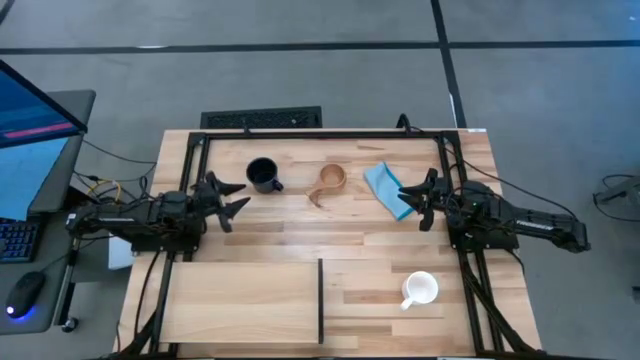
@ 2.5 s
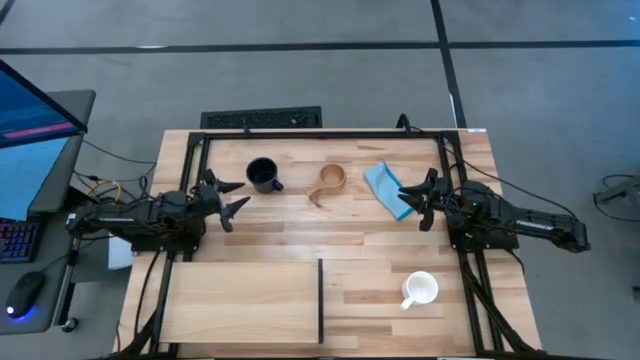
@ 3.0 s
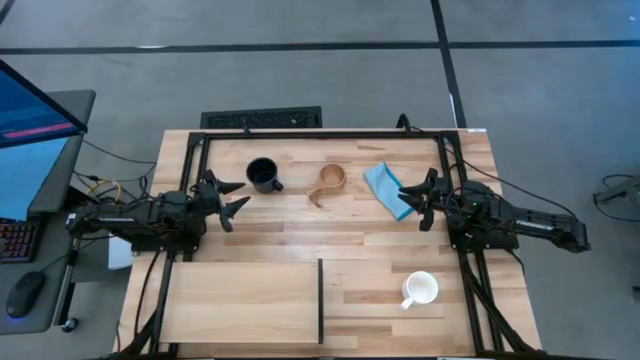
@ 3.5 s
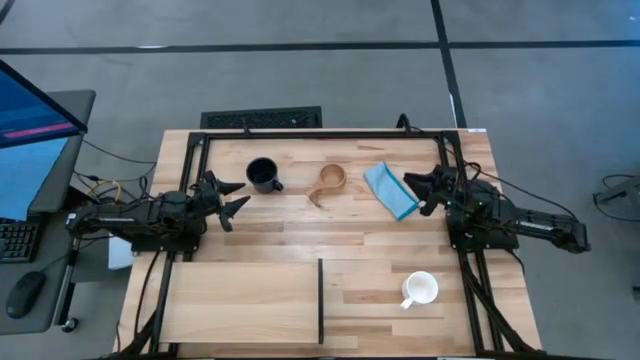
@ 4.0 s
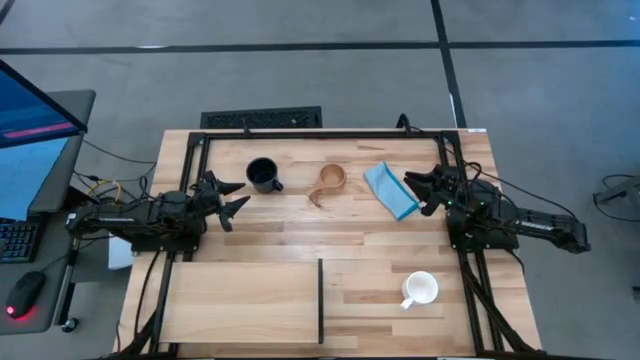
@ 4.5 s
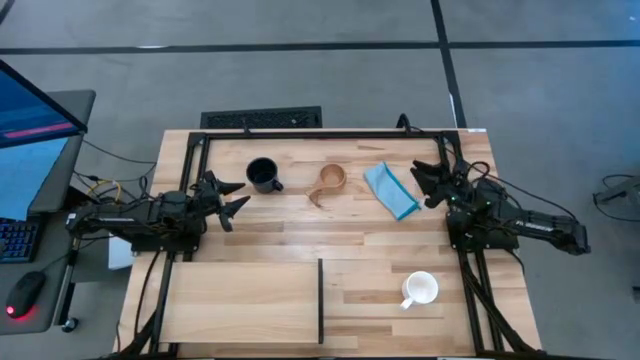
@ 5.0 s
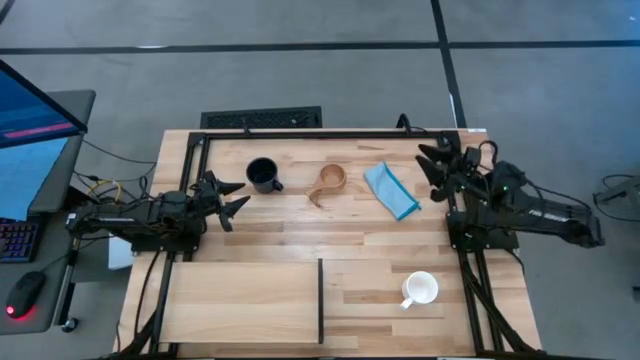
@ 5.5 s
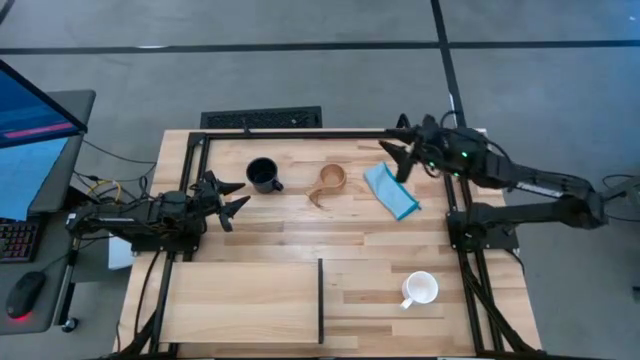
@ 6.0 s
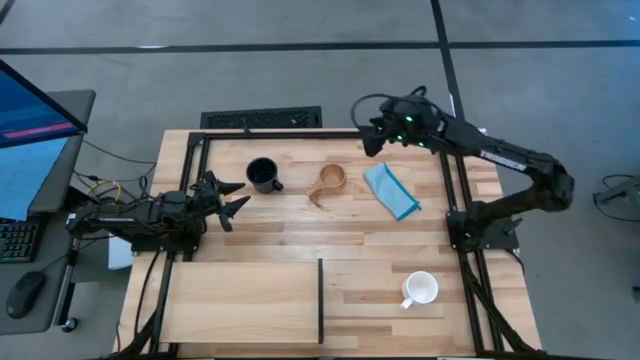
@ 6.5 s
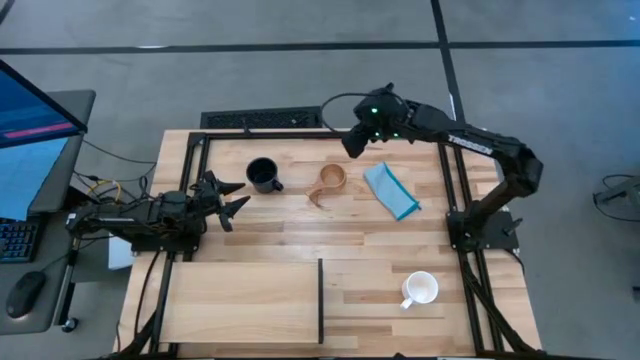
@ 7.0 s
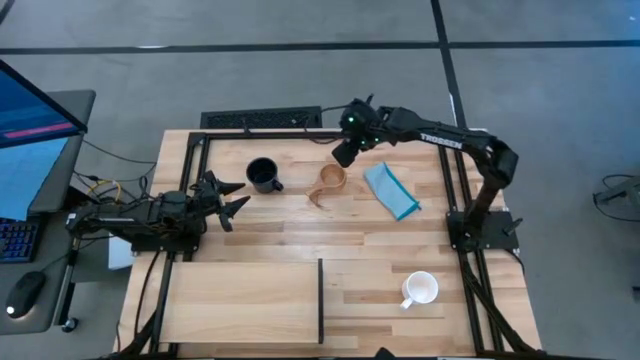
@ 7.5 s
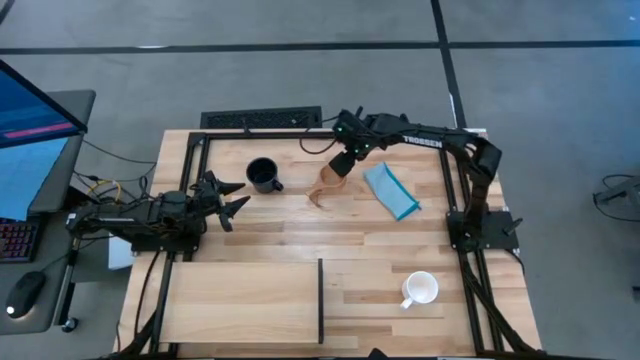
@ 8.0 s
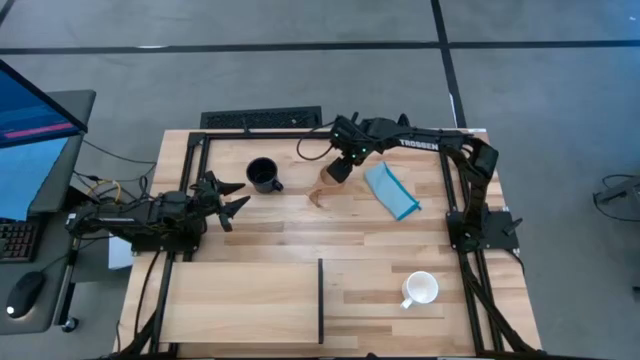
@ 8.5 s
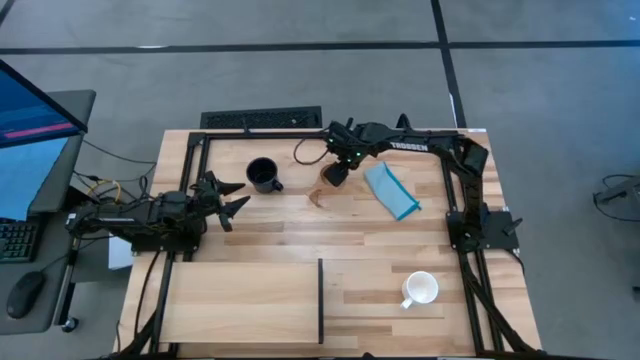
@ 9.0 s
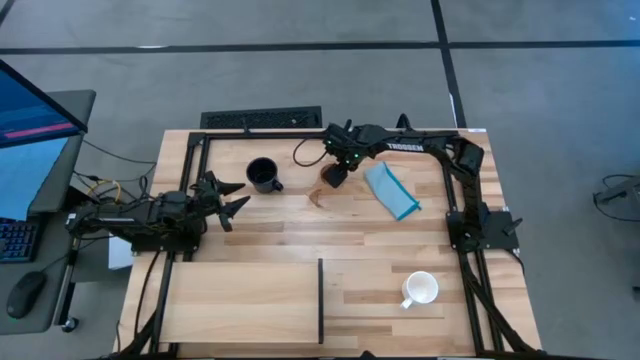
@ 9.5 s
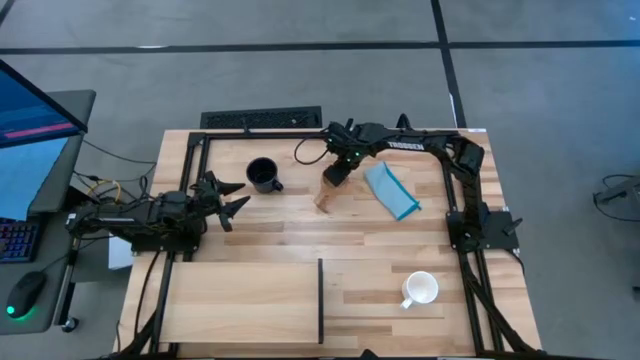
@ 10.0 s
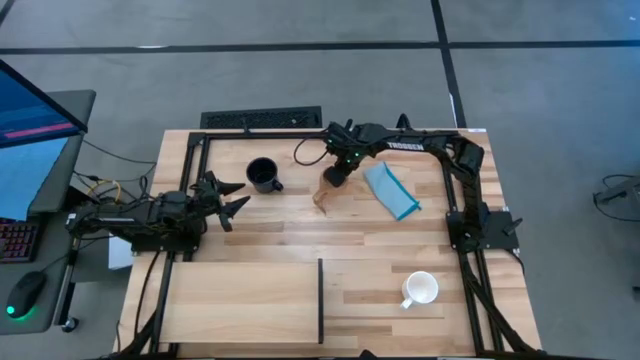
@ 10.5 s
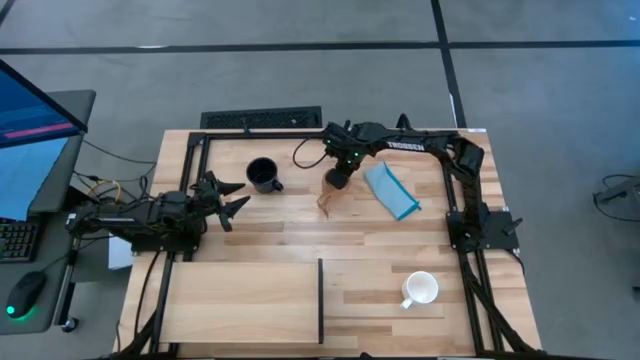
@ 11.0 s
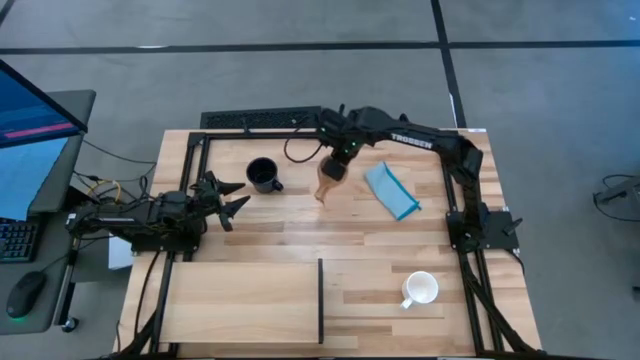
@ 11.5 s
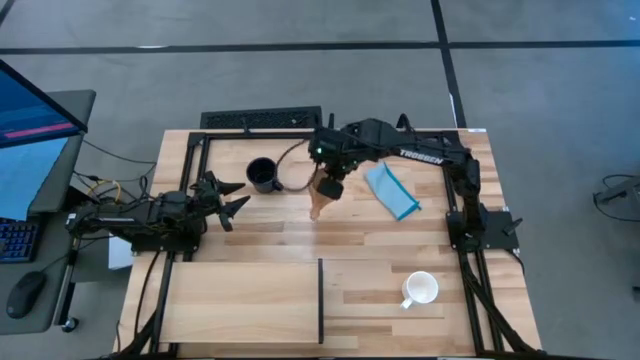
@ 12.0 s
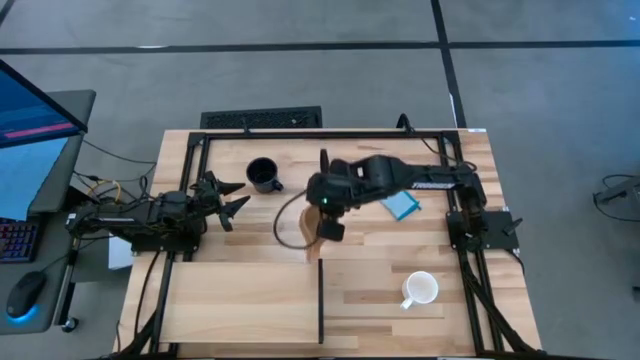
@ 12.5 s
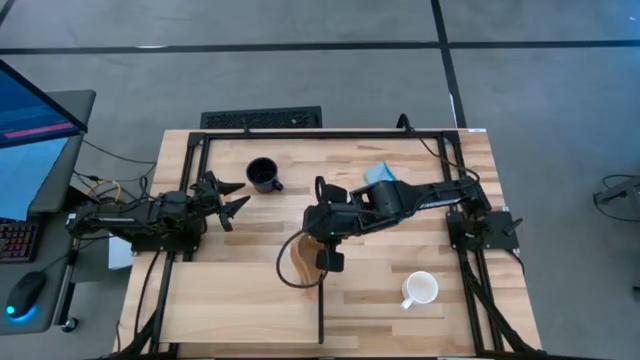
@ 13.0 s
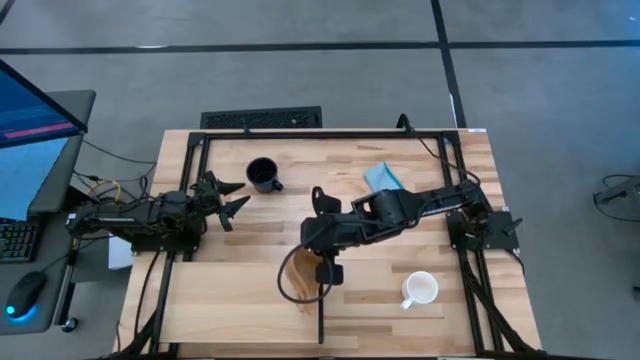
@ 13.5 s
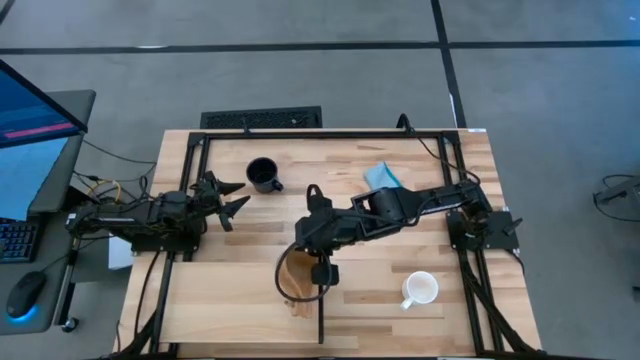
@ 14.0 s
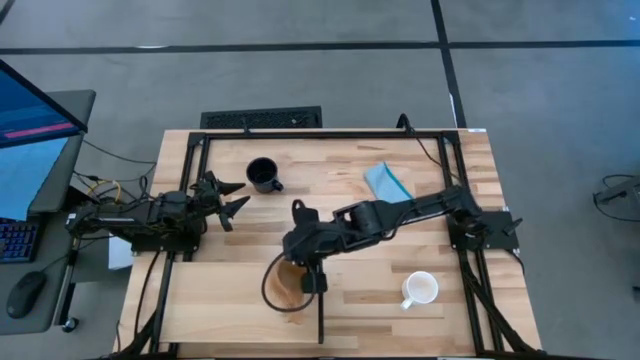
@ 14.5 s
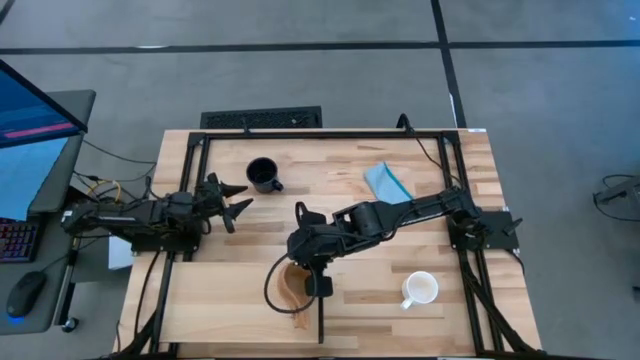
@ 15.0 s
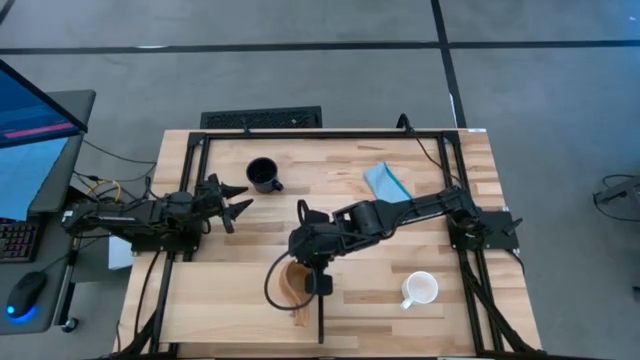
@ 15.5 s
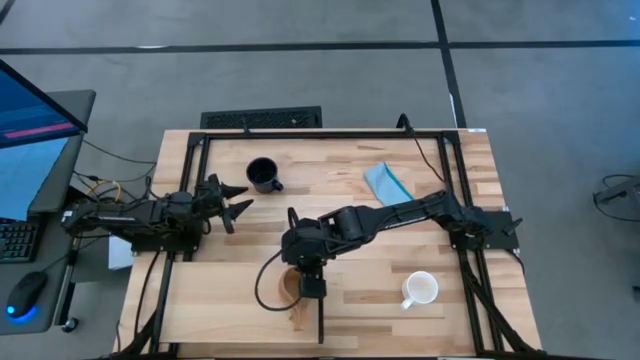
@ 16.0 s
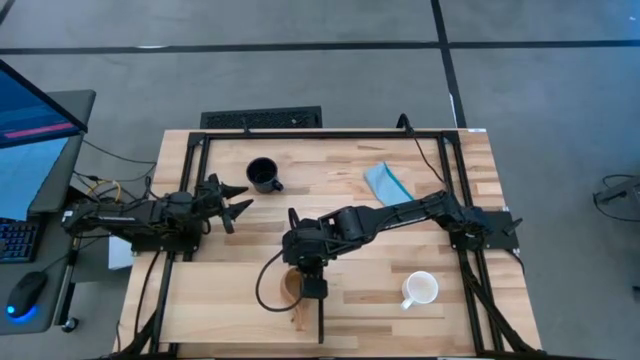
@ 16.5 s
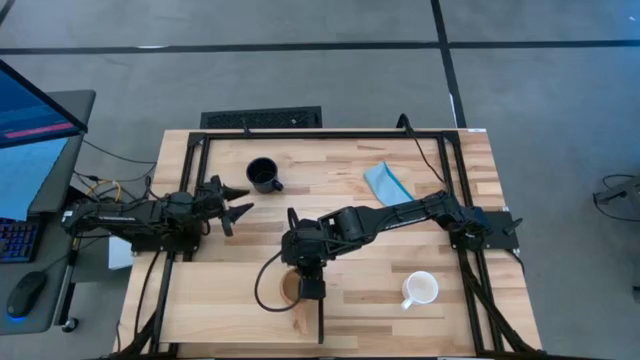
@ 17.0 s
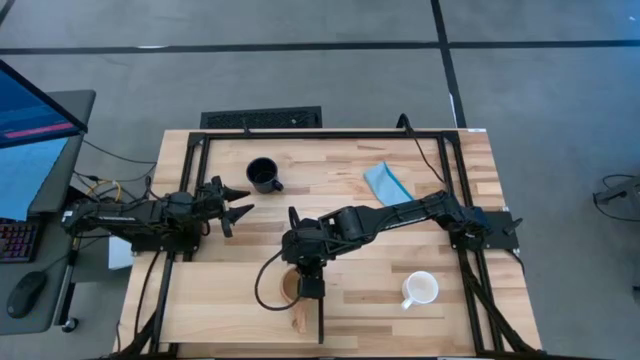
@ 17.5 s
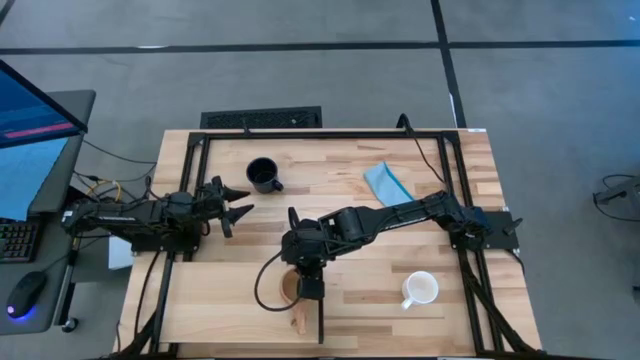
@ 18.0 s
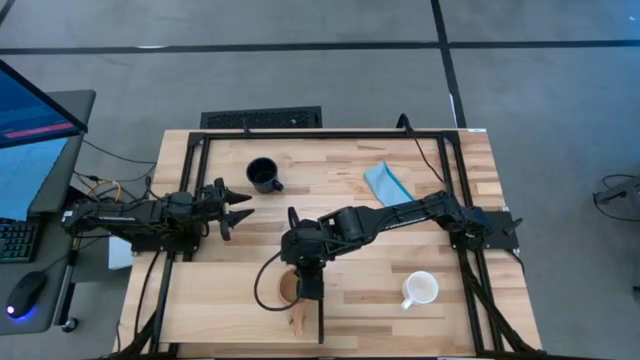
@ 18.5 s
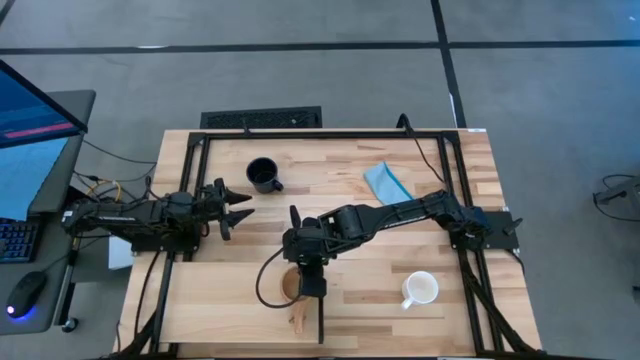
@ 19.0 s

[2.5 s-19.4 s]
Task: Stack small to large cups/mugs on shelf
Put the brown mug on the shelf

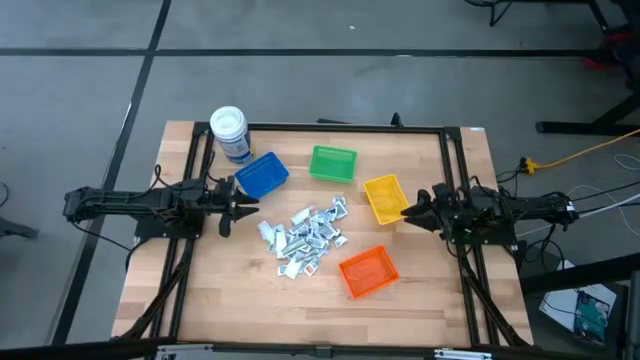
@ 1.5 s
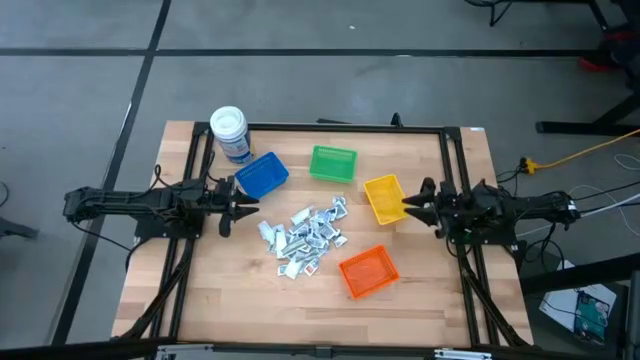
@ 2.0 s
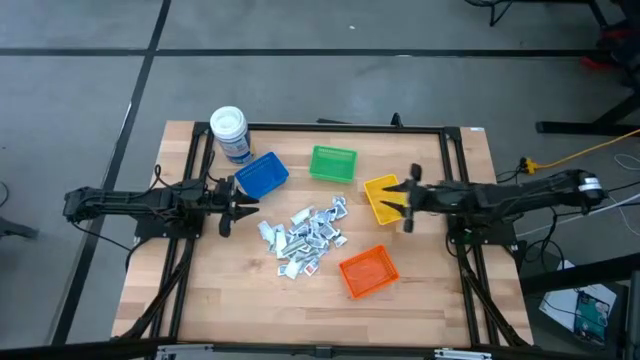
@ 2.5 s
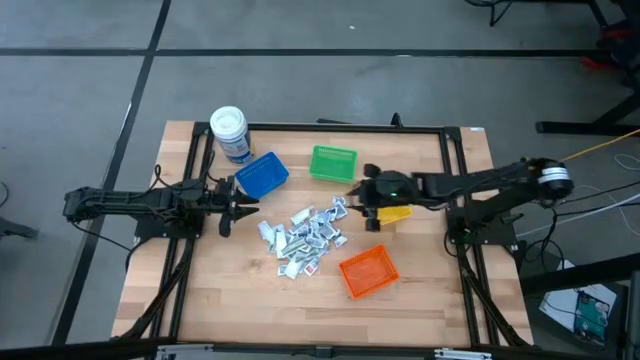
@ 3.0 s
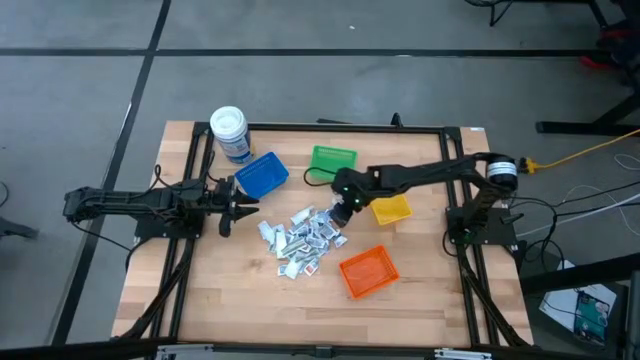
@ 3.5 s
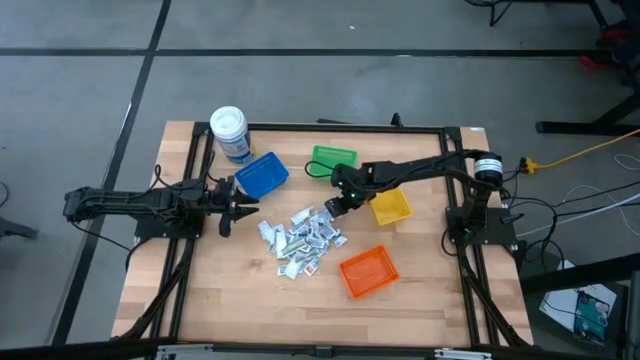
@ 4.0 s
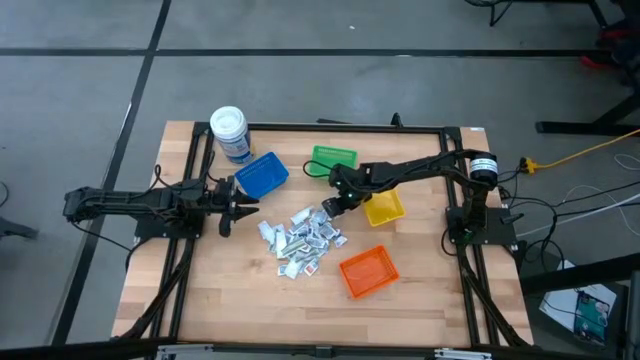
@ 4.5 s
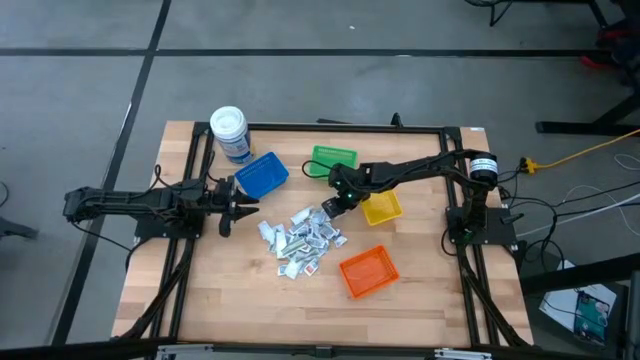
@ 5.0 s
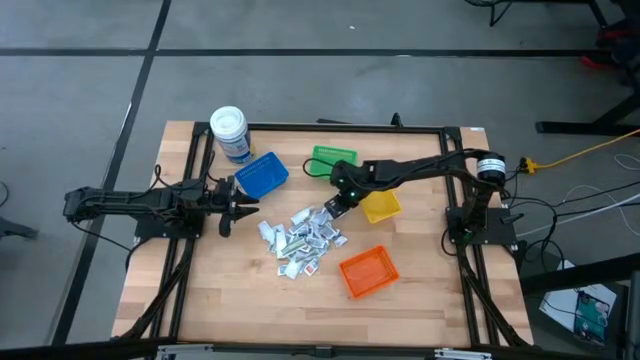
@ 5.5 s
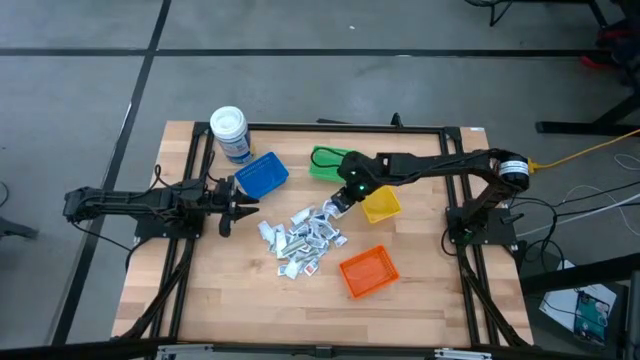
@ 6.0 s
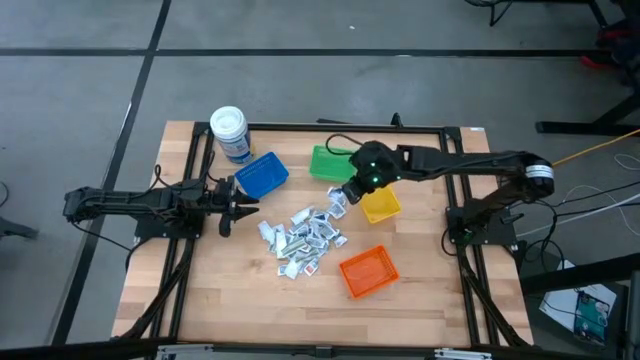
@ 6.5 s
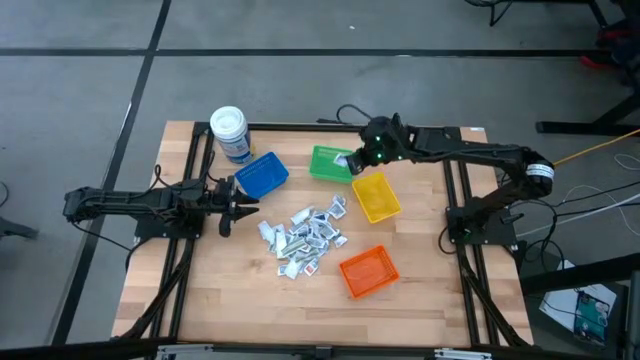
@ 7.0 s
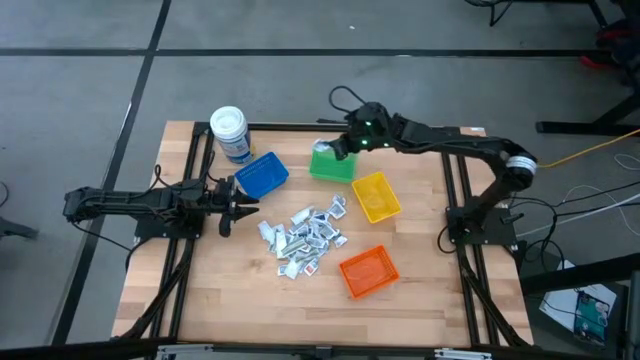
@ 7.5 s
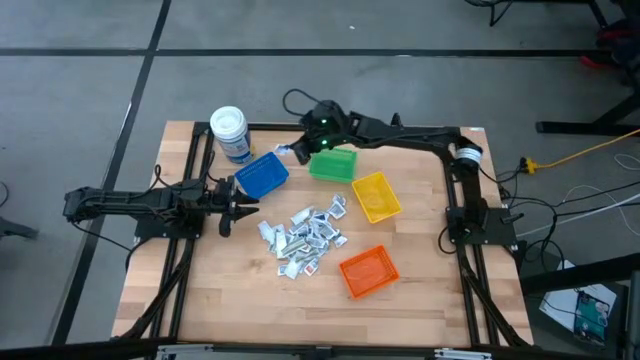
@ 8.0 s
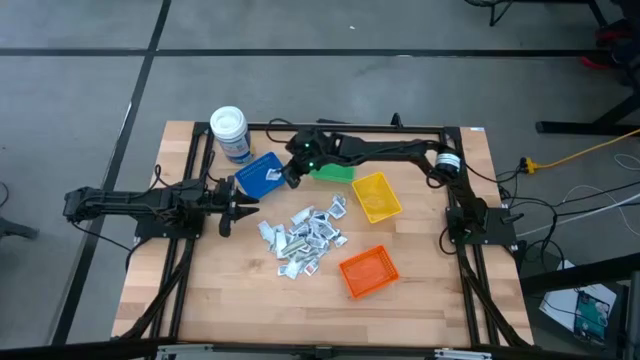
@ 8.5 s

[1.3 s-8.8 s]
Task: Pick & Place First Aid Supplies
Put the white alcohol pad into the blue bin
